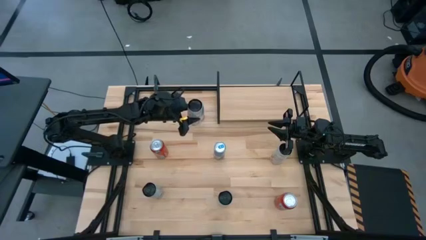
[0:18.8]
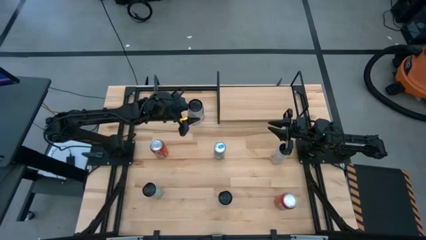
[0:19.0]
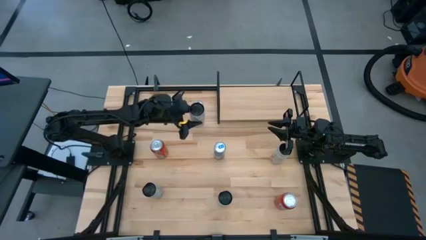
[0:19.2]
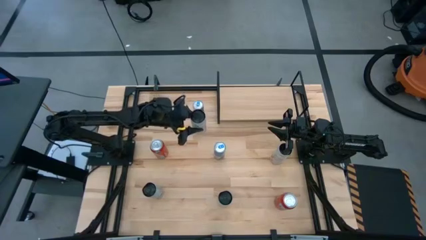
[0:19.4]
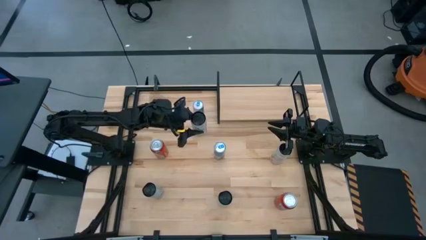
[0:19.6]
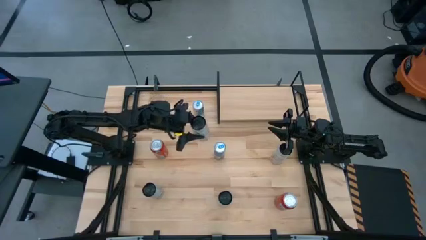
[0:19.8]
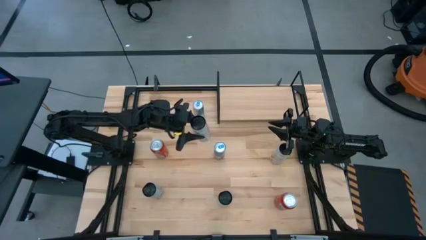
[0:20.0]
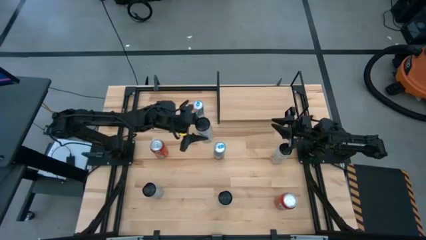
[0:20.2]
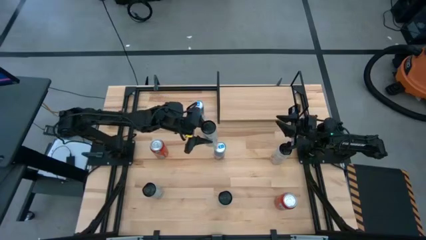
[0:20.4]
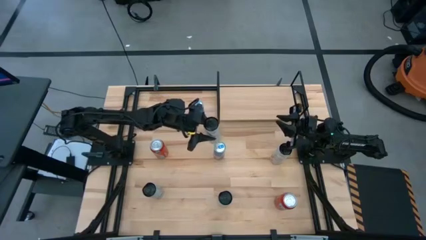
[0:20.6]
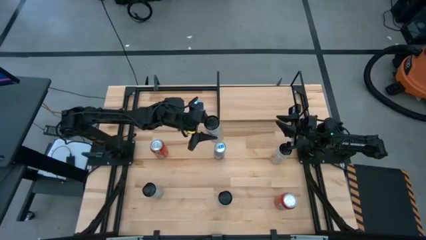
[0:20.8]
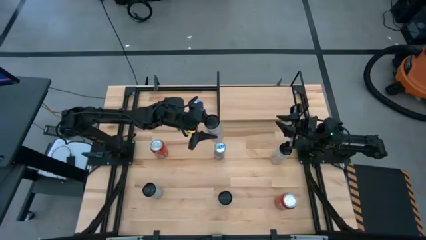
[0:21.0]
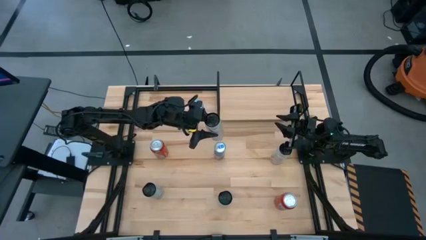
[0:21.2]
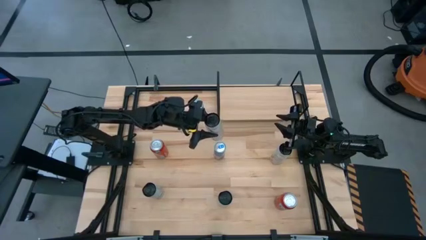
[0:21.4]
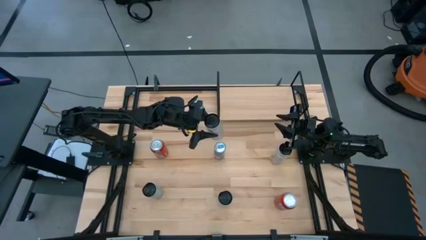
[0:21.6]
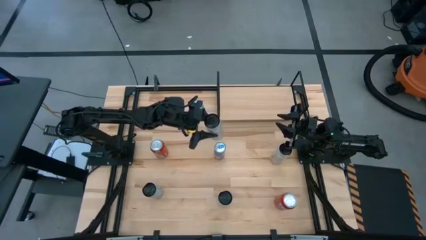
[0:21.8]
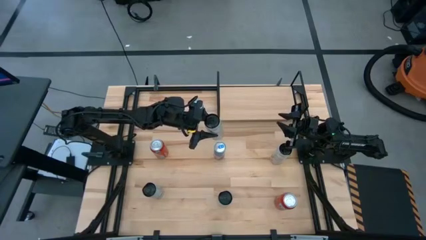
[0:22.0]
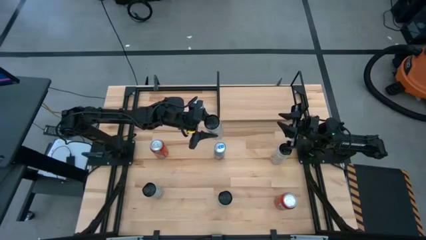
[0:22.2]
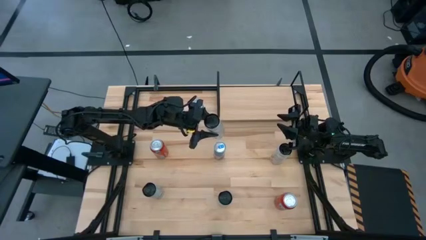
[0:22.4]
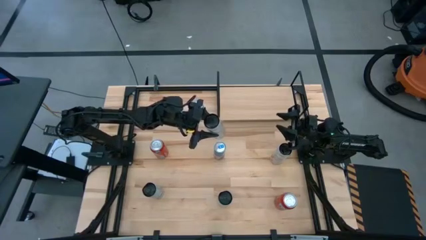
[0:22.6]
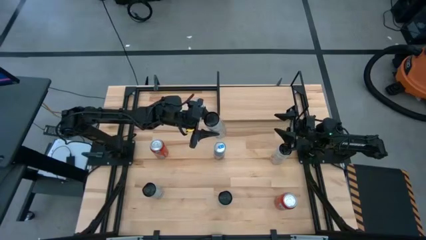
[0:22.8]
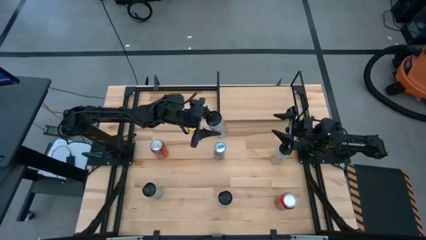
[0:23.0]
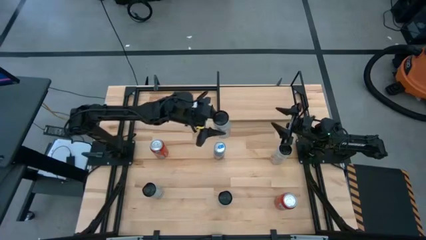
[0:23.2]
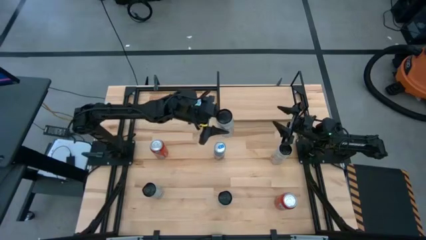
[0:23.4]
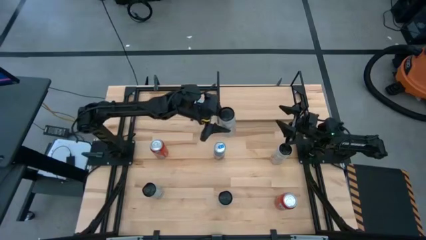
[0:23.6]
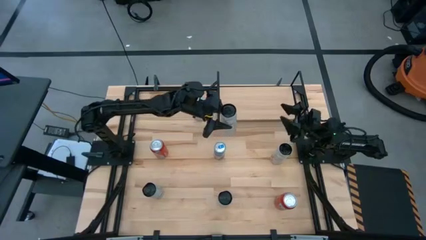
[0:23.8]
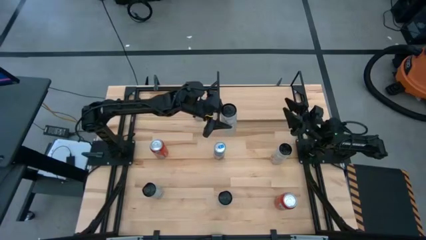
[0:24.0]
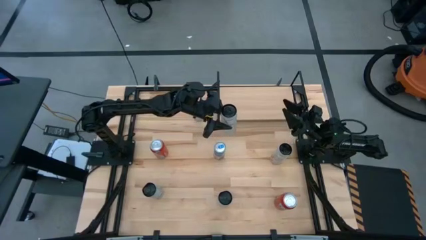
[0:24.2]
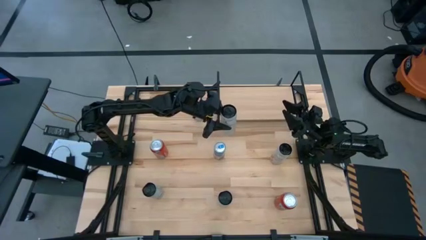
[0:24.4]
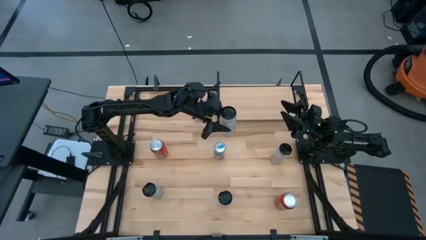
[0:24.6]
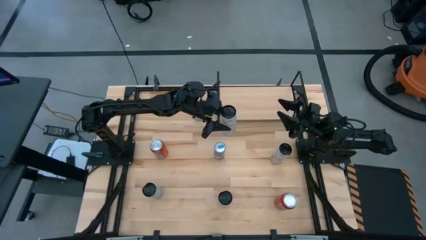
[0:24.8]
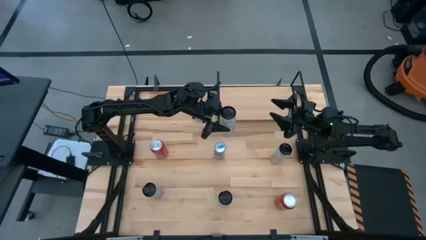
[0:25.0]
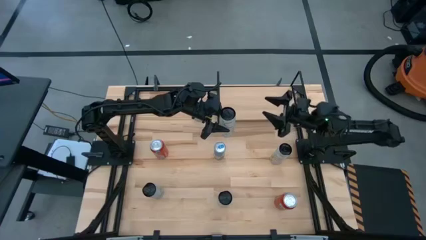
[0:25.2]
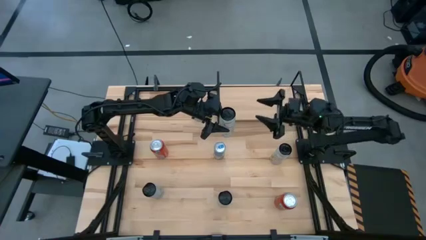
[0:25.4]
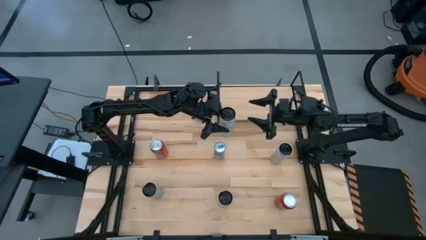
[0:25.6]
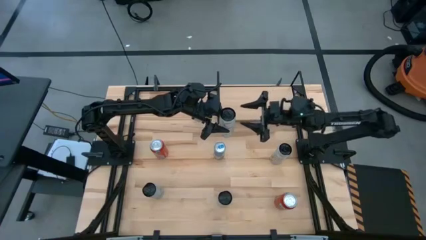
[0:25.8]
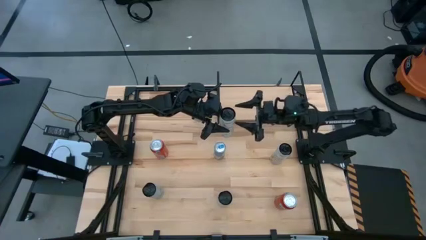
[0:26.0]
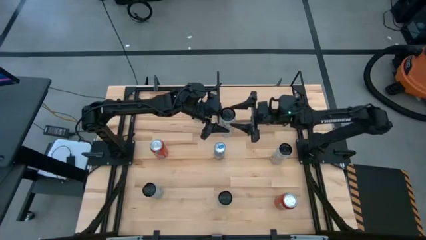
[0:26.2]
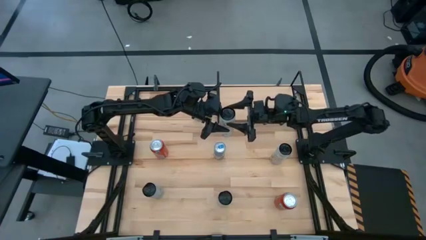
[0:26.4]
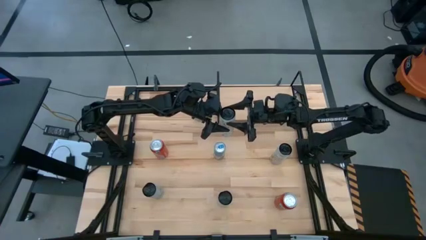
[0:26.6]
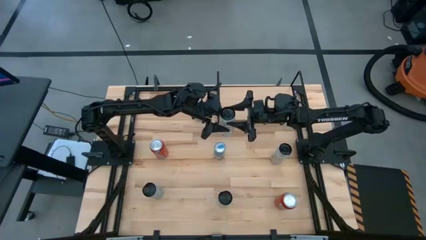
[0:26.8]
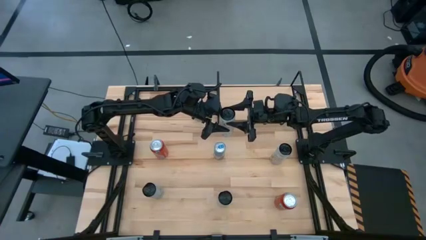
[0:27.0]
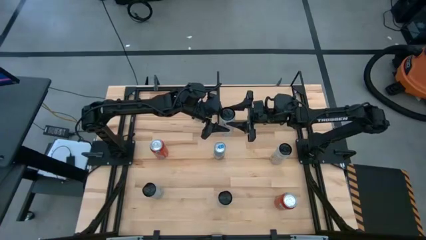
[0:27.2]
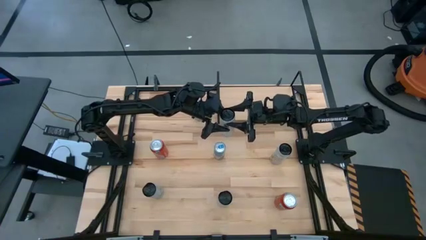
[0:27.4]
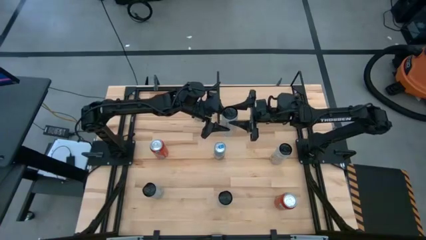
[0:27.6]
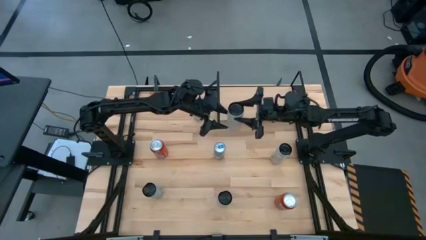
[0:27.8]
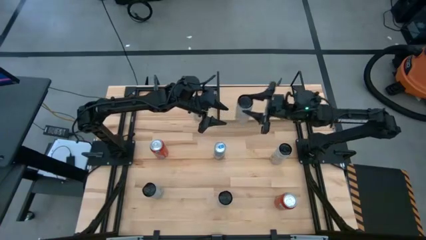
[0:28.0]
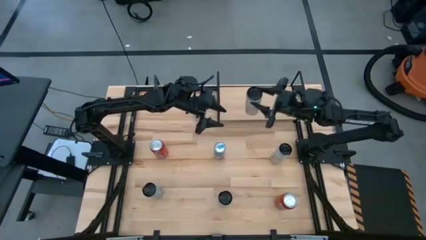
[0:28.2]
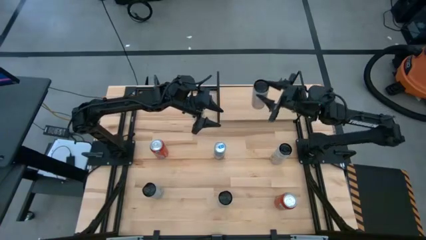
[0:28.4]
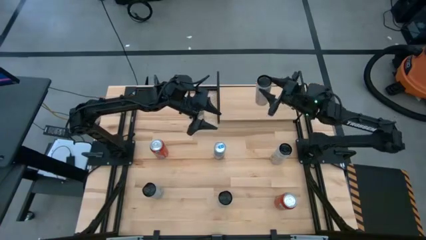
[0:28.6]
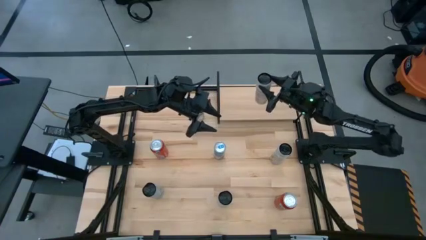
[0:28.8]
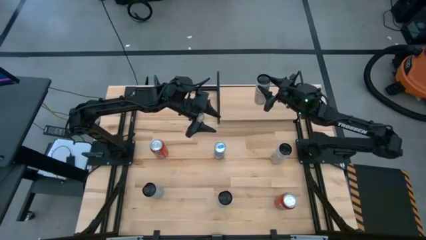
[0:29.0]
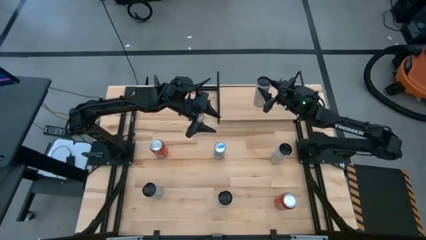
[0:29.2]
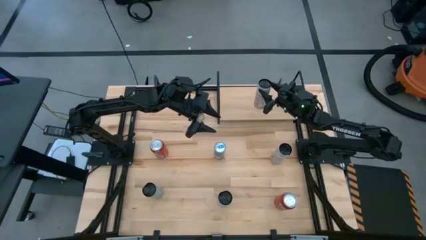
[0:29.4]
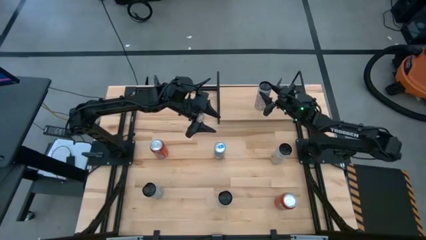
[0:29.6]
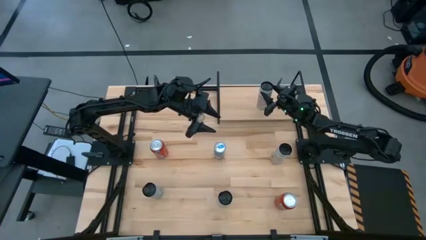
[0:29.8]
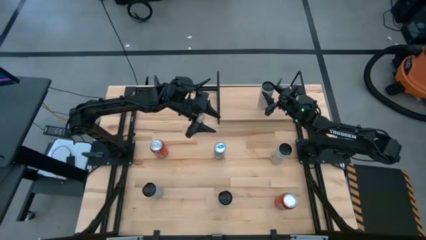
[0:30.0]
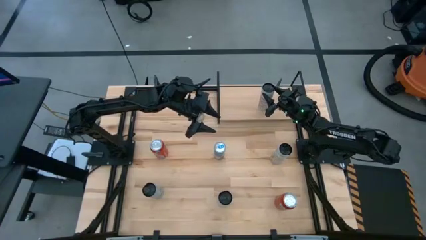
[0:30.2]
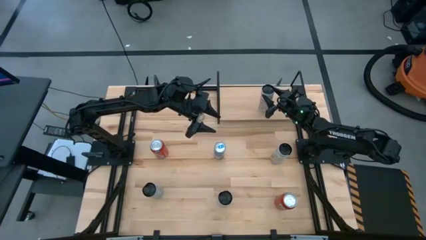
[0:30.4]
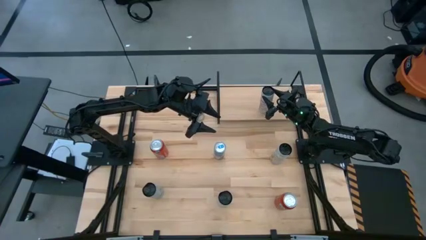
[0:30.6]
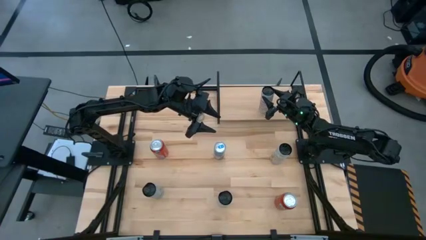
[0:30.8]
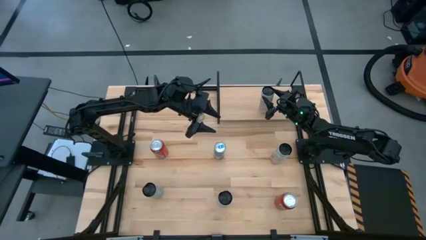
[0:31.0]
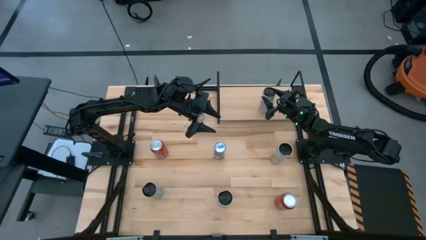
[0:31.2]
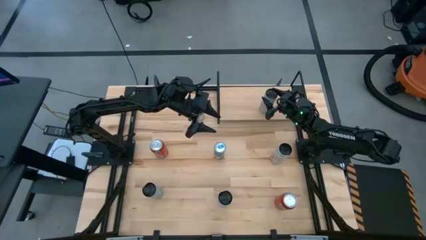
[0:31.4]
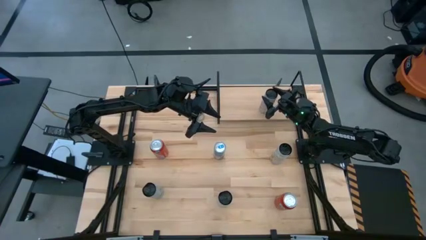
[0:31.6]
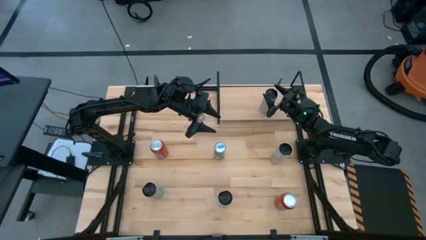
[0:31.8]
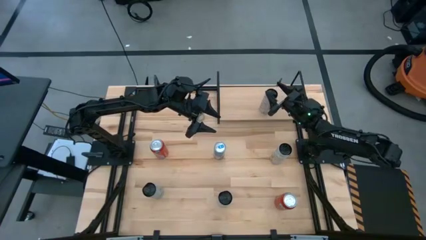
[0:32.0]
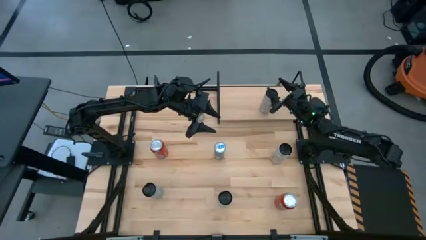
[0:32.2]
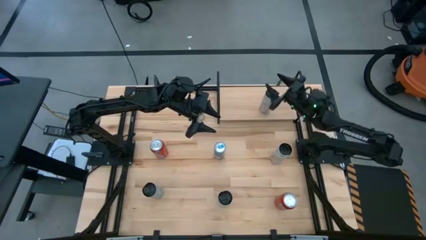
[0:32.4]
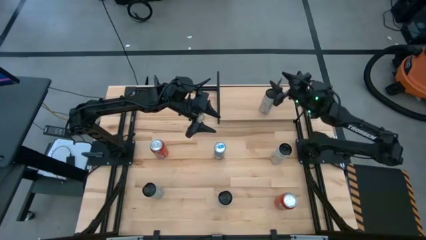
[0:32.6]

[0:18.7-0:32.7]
Task: Place canned beverage on shelf
Put the top white yellow soda can on the shelf

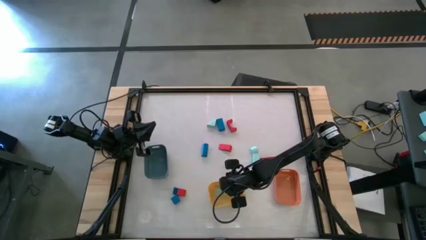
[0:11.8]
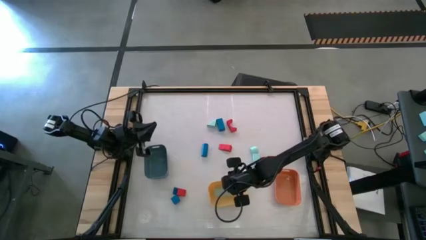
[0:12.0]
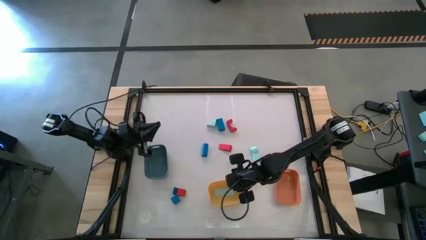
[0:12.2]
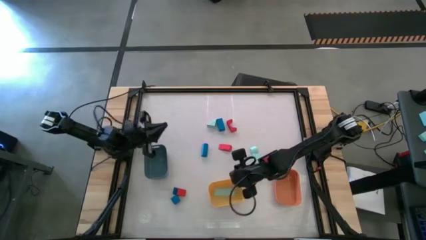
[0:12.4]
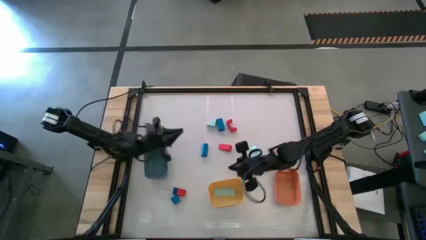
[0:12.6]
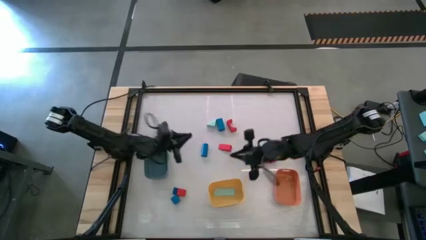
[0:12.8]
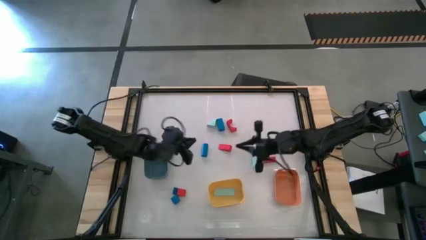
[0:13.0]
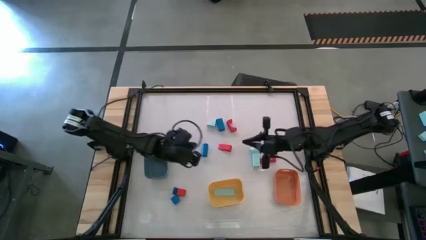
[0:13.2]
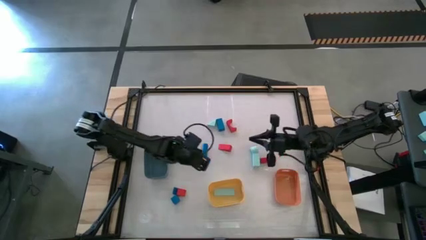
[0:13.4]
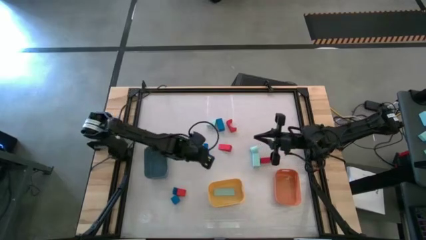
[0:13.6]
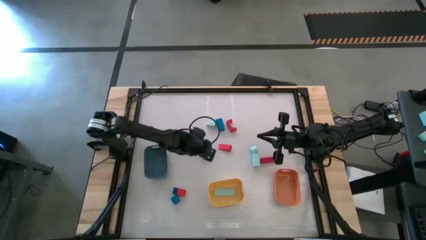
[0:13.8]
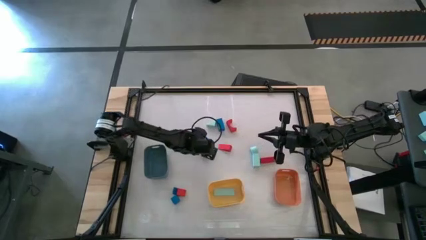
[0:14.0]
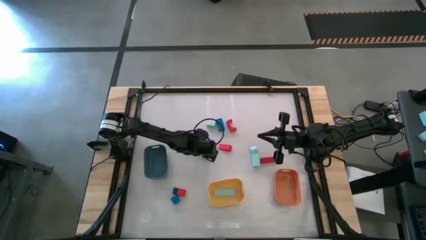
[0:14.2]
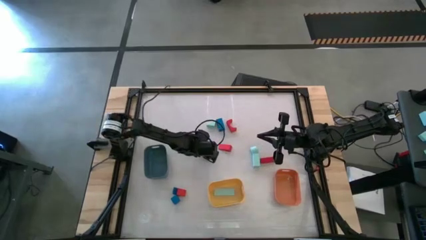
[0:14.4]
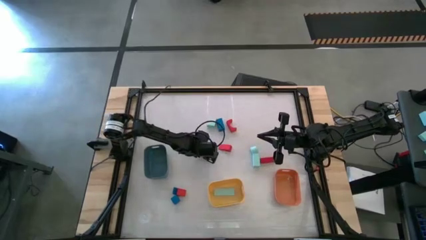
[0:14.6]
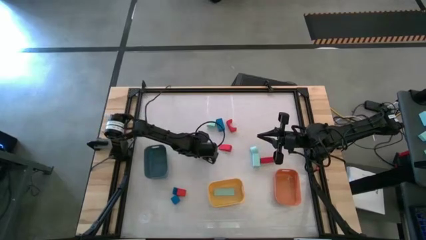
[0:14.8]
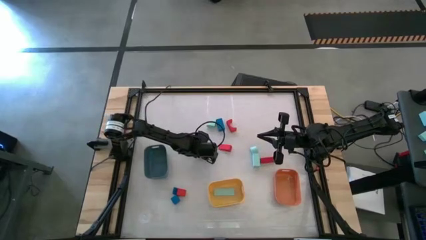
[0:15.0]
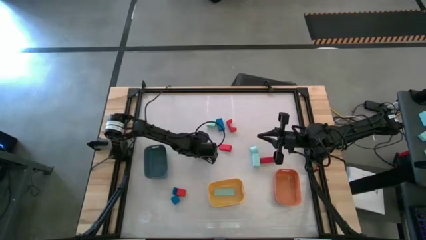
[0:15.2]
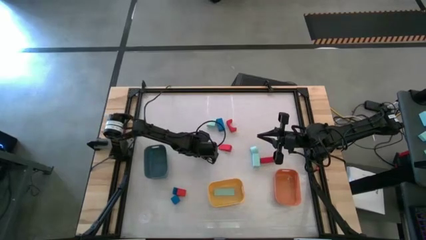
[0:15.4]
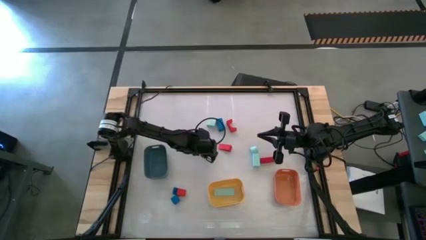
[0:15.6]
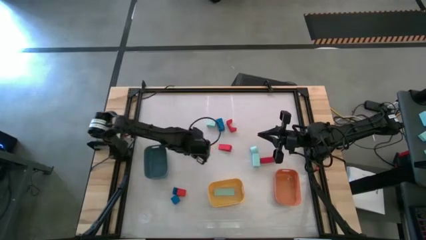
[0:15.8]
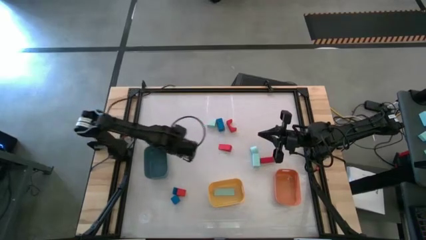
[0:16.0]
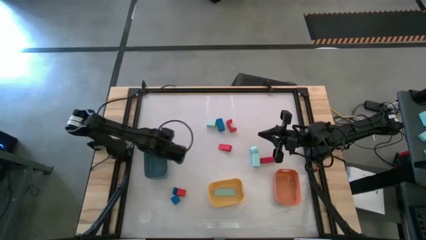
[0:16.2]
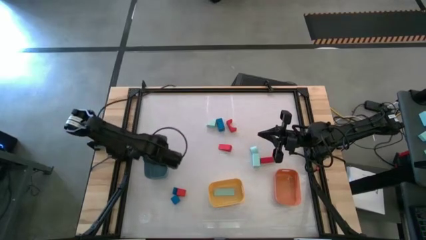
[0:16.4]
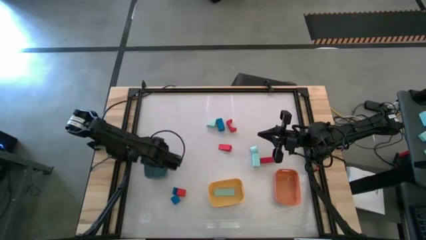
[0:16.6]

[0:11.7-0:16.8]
Task: Sort & place blocks by color
Put the blue block into the blue bin
